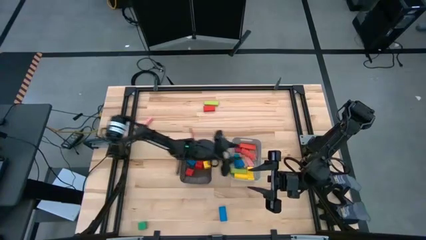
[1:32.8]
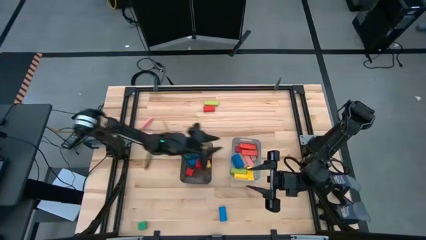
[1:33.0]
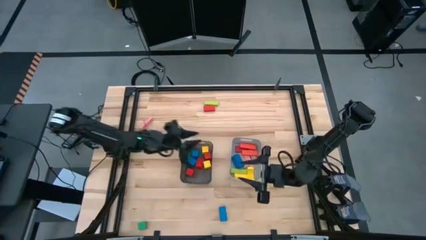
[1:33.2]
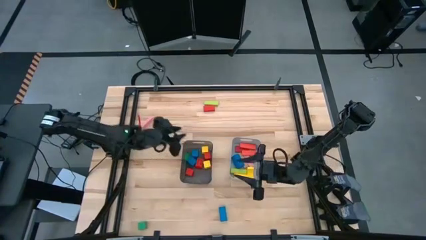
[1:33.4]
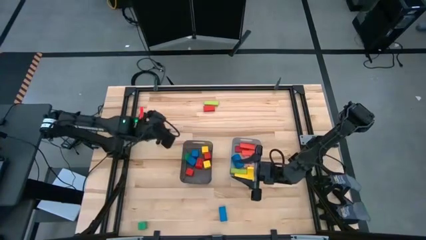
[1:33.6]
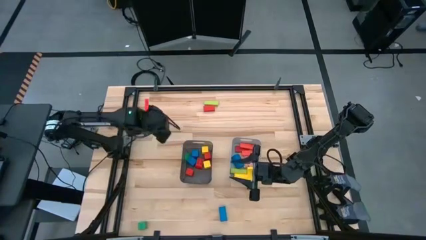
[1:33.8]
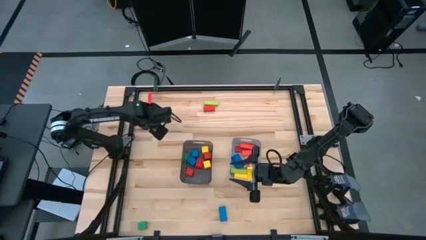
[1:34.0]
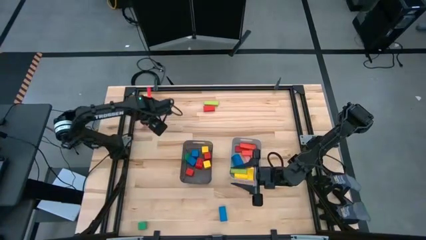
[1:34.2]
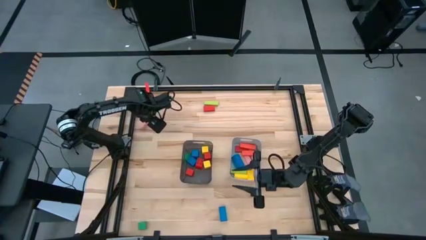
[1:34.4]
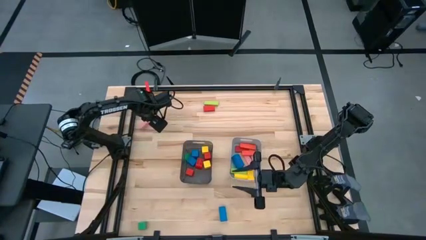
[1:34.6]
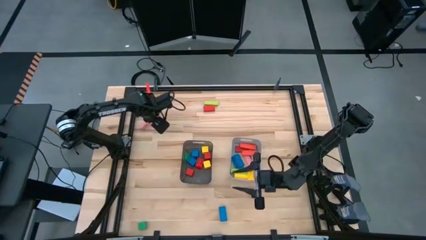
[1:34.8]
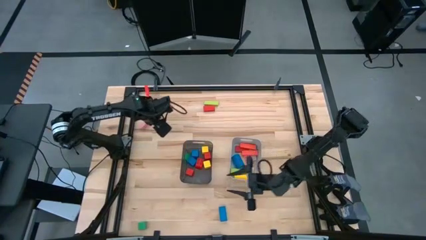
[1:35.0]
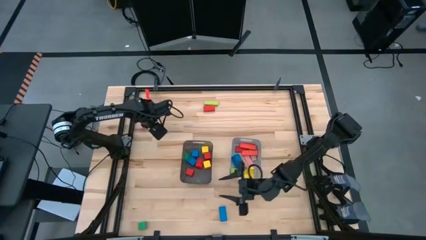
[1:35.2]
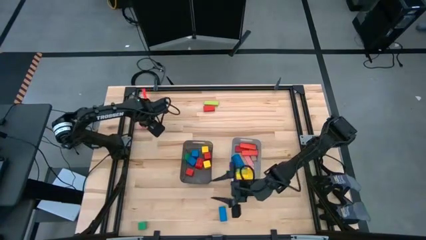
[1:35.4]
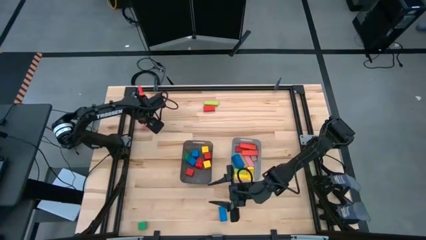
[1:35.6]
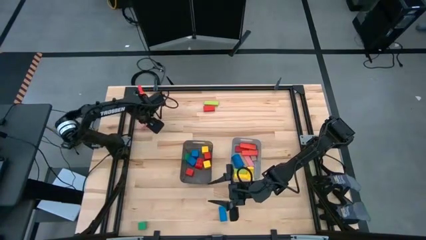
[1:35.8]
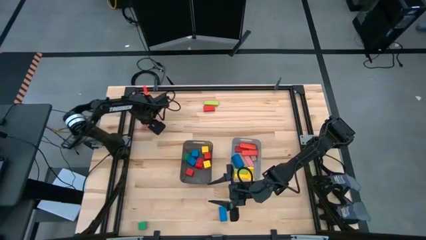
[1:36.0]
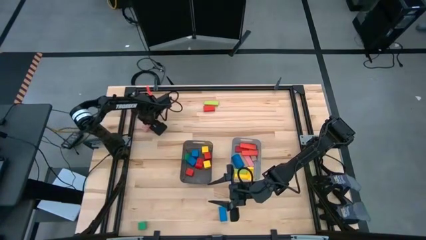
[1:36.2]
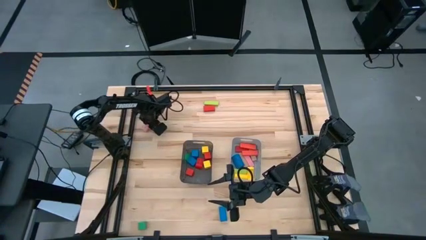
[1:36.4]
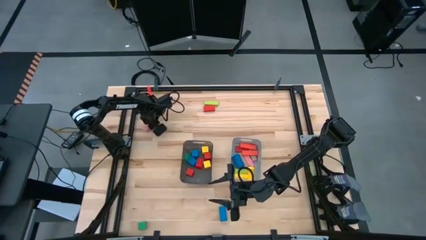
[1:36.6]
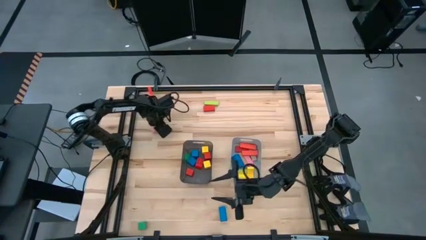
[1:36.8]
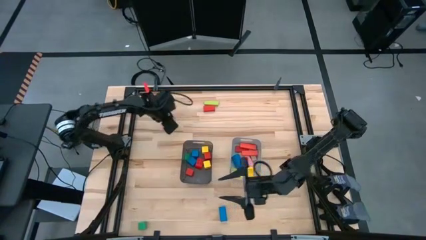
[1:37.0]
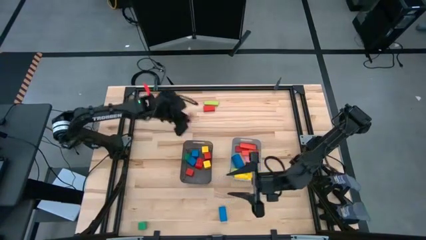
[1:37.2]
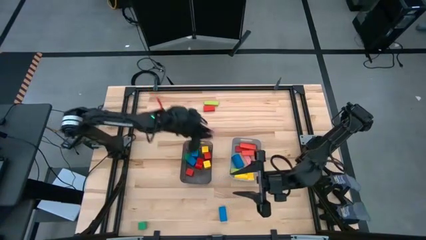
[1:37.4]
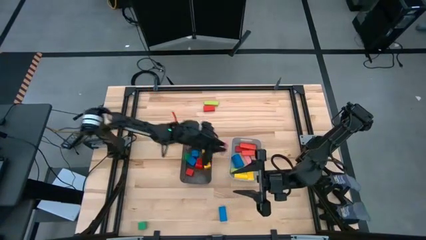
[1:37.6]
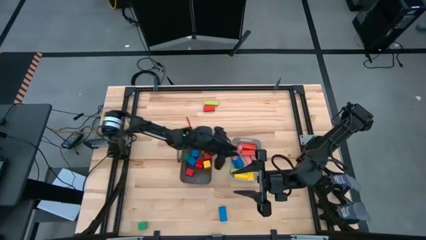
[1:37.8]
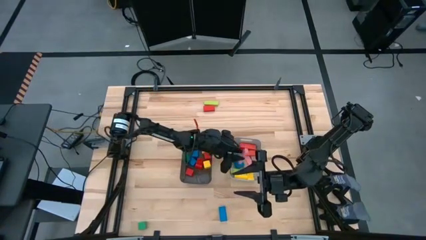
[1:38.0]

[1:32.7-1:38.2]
Task: Sort blocks by size
Put the large pink block into the gray bin

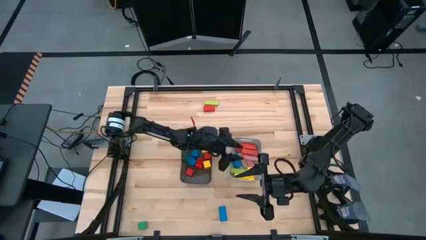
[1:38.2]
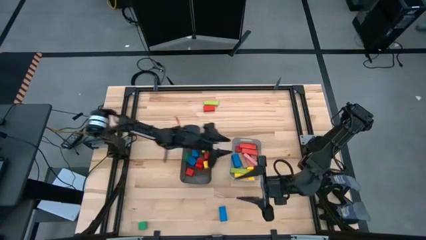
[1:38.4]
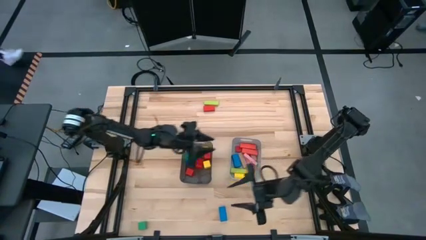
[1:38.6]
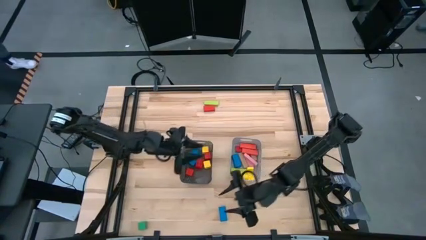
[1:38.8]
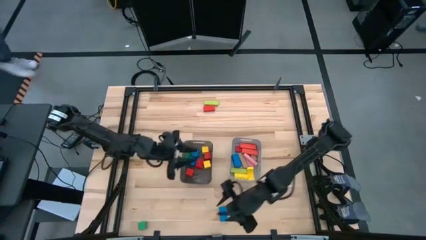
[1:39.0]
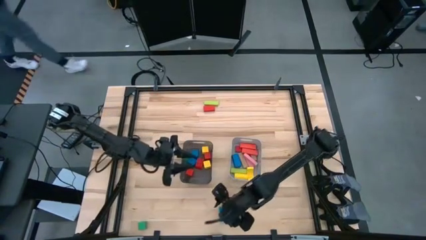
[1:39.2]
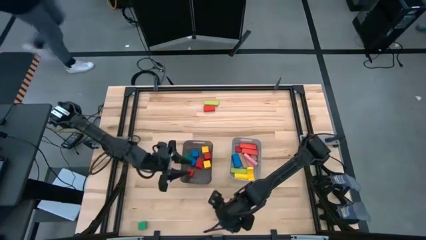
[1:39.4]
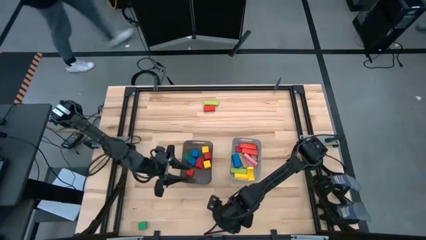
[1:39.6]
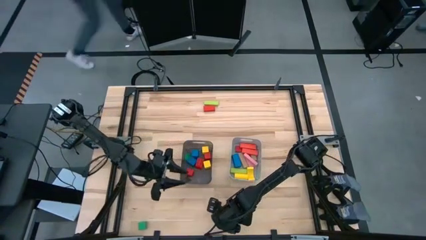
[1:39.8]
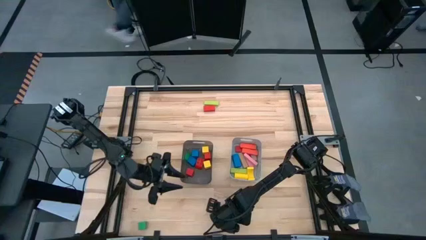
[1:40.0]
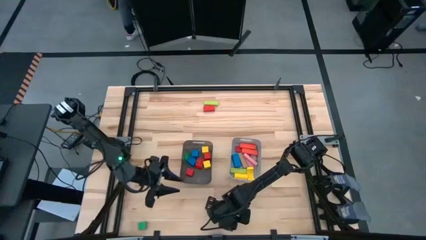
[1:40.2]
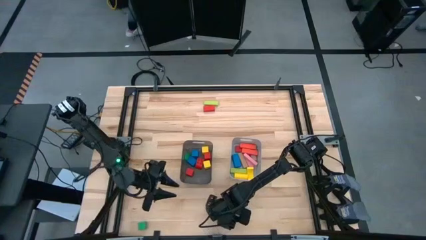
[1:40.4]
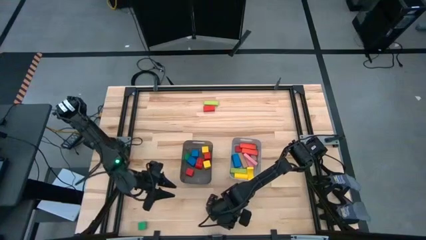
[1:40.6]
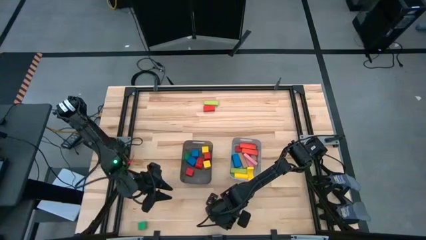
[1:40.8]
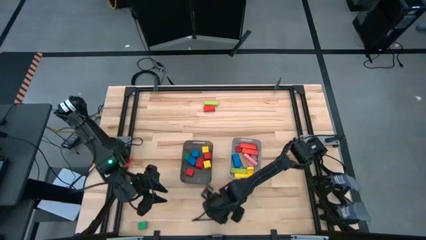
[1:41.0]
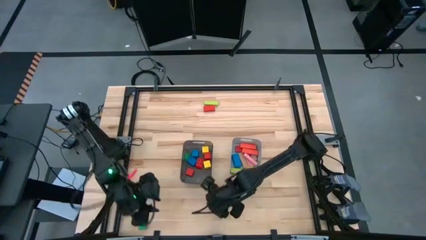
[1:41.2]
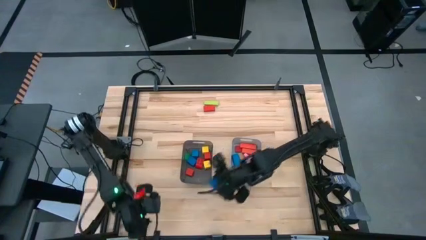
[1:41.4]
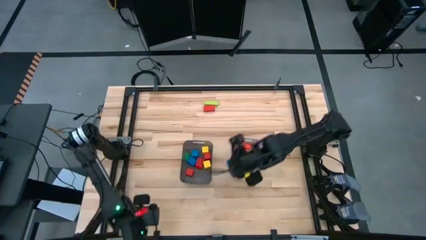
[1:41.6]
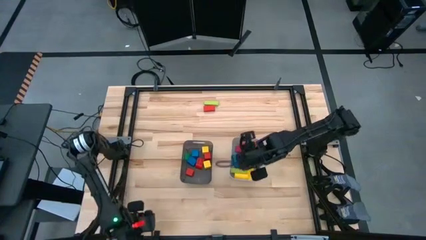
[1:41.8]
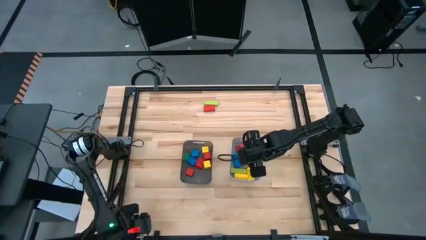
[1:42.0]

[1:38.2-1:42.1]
Put the large blue block into the gray bin

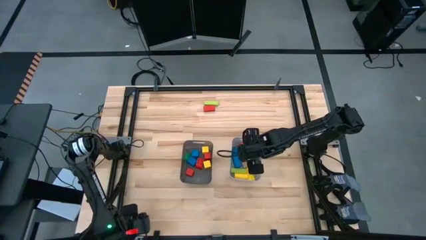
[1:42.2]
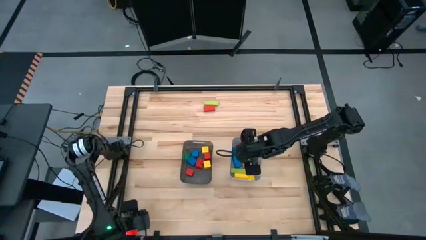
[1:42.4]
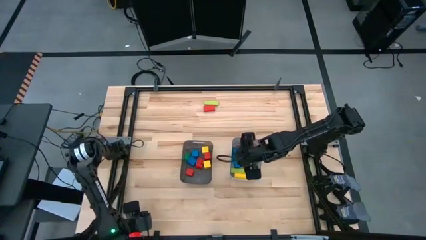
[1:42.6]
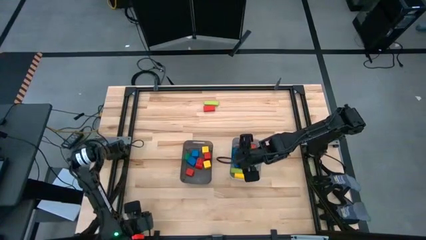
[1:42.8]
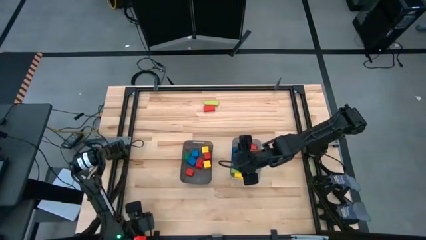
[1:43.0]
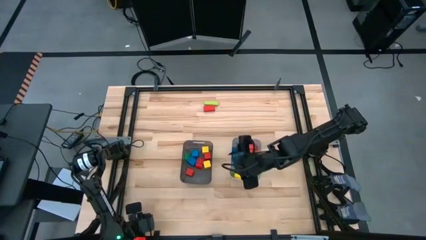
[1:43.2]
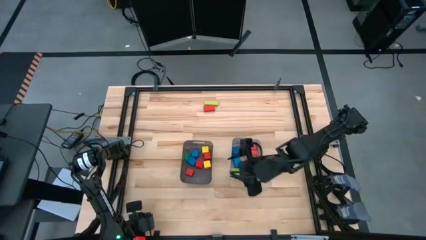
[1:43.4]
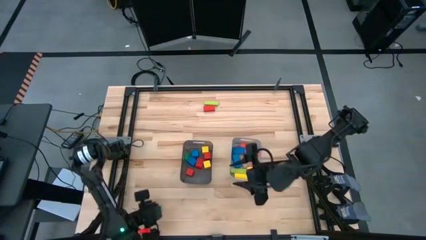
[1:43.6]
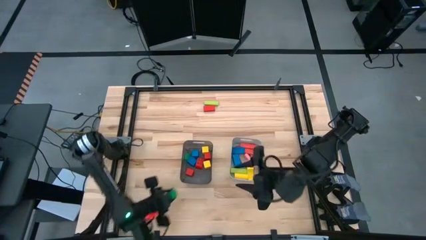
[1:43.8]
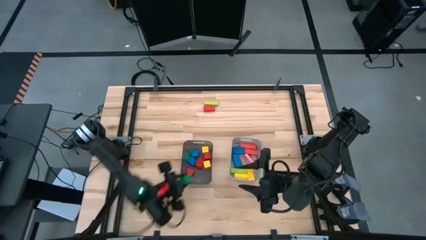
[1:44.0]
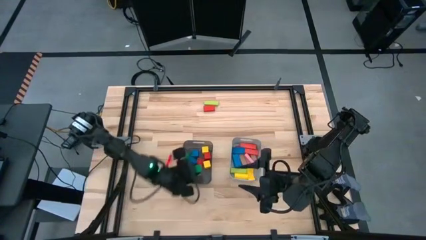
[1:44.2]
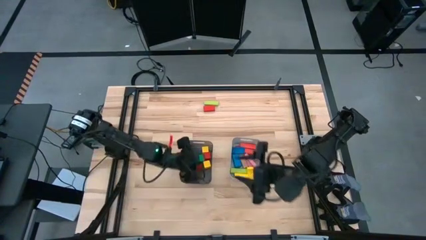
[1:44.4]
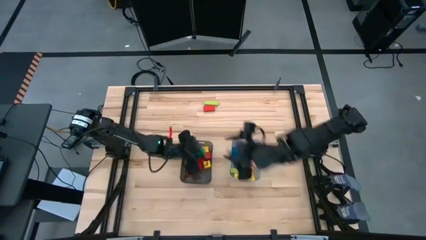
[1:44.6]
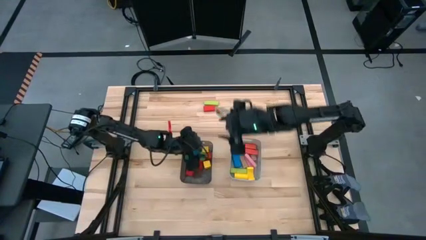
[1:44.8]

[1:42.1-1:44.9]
Put the small green block into the black bin

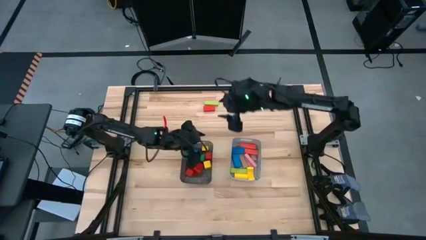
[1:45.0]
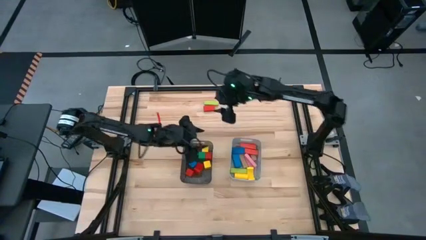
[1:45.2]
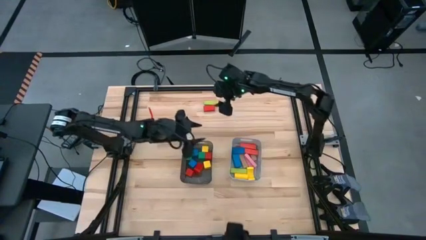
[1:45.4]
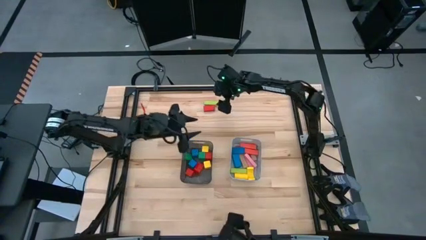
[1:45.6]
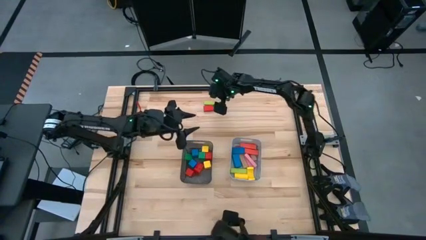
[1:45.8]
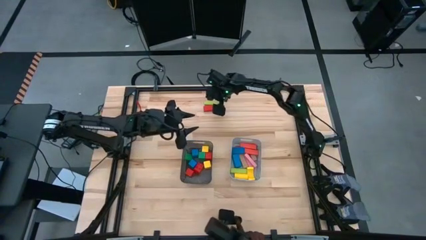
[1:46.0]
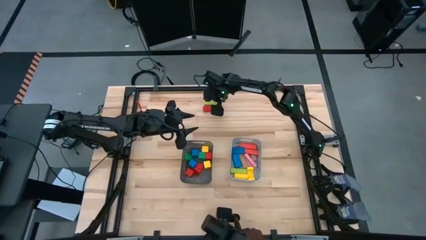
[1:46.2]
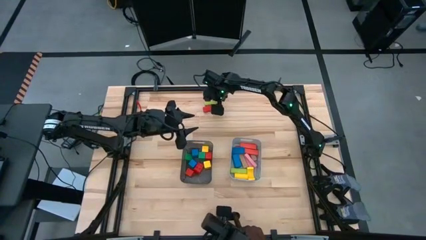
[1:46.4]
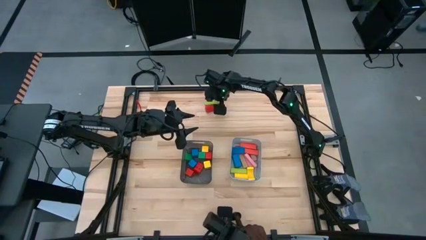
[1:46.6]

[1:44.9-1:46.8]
Put the large green block into the gray bin

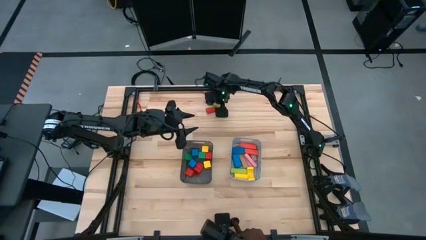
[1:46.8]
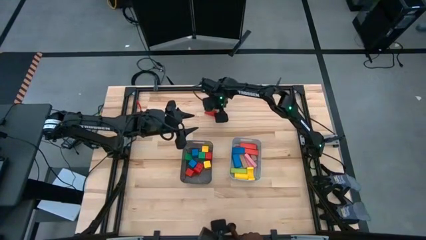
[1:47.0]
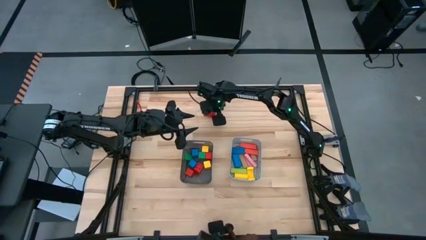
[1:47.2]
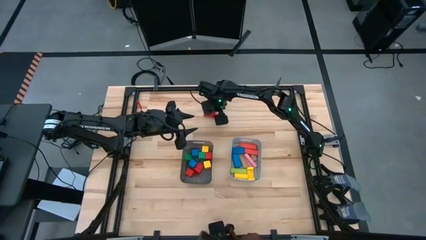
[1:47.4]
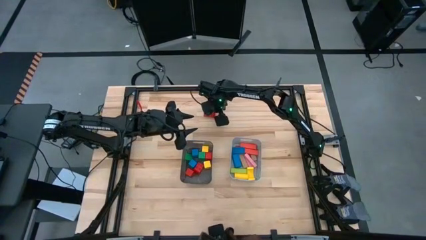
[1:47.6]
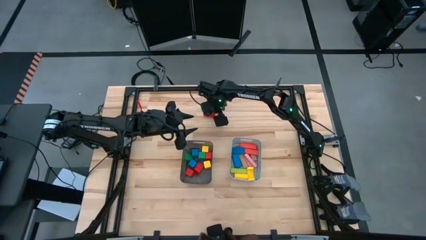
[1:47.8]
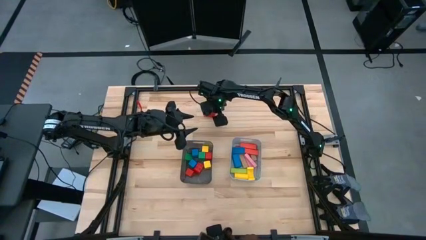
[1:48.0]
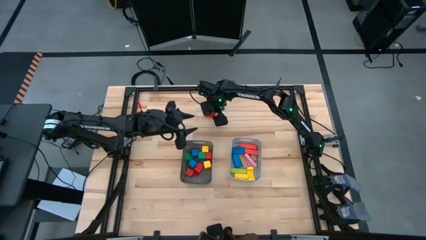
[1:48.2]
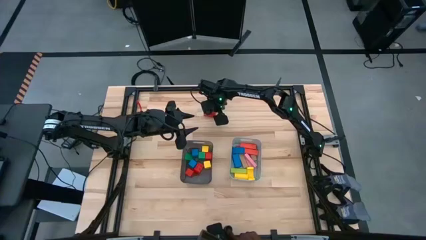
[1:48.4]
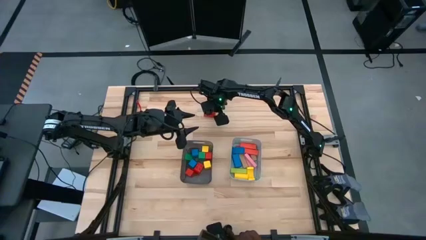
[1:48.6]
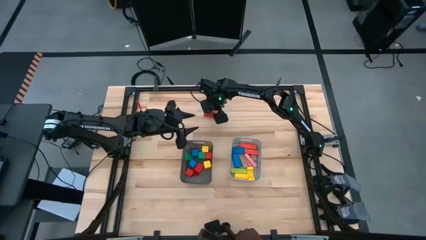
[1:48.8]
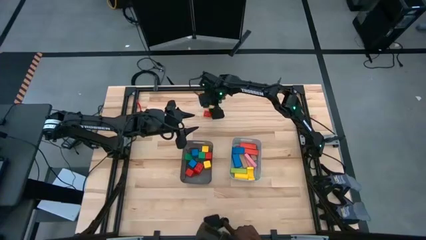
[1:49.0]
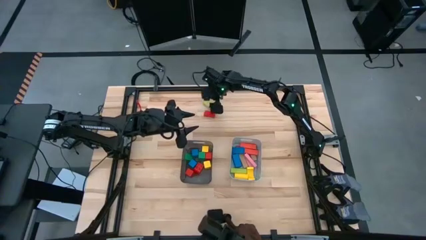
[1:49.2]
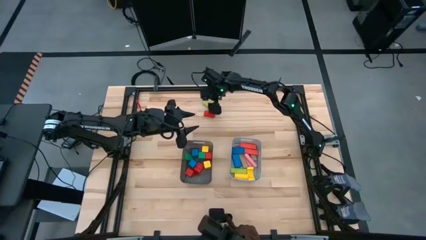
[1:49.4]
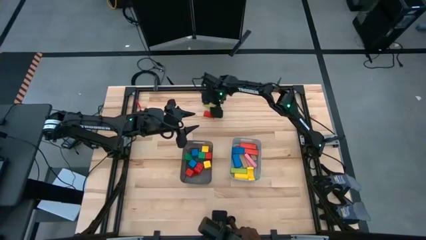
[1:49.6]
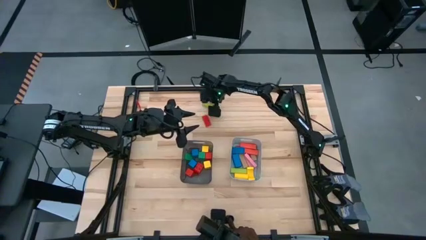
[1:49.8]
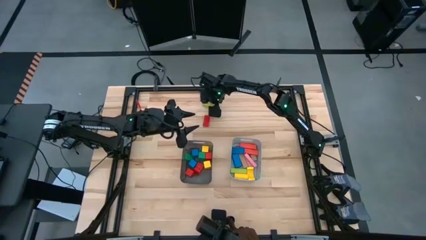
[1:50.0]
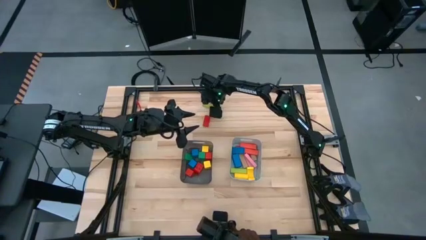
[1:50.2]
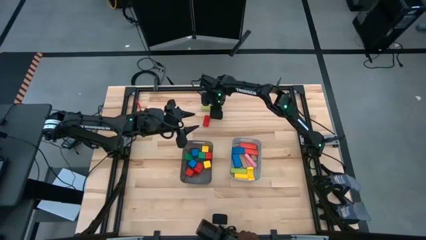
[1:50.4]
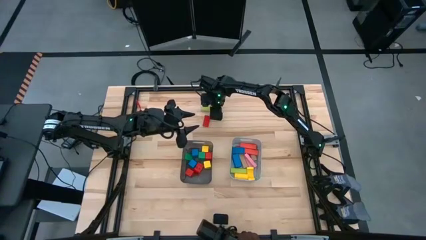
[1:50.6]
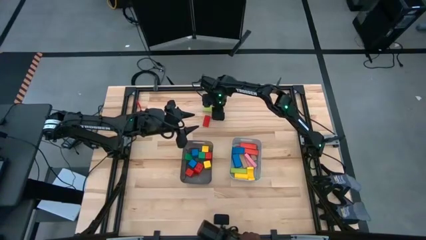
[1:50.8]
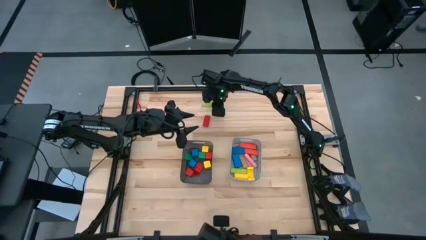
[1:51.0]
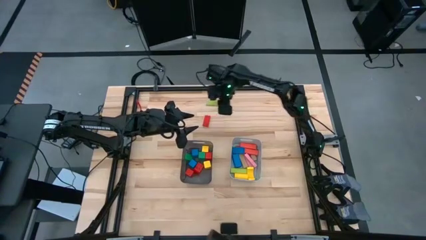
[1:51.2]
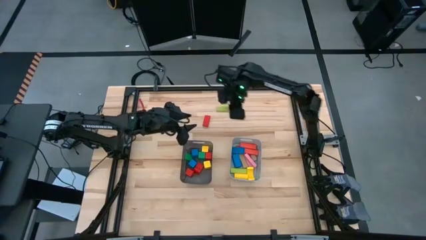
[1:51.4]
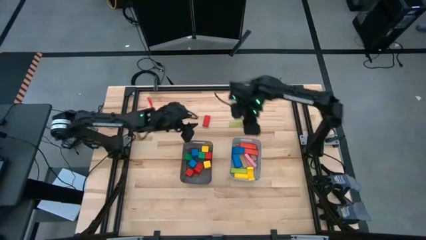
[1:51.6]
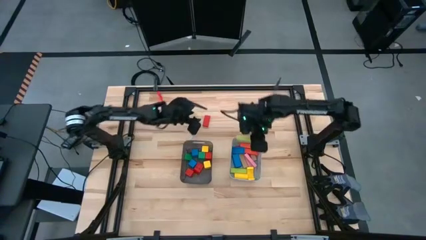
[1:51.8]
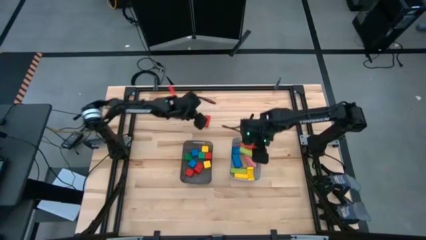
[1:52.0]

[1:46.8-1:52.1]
Put the large green block into the gray bin
